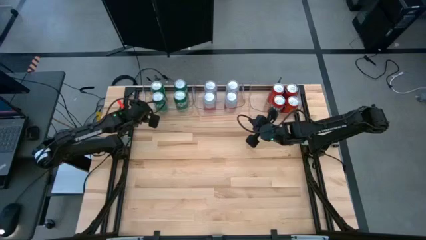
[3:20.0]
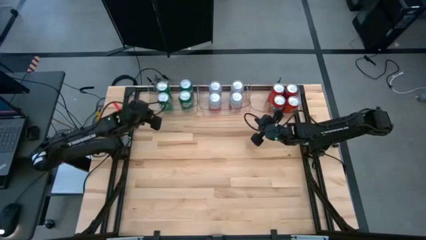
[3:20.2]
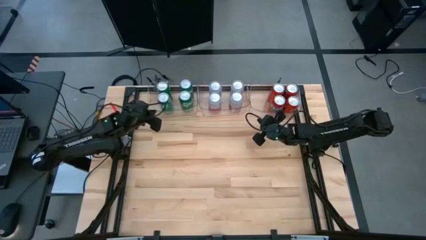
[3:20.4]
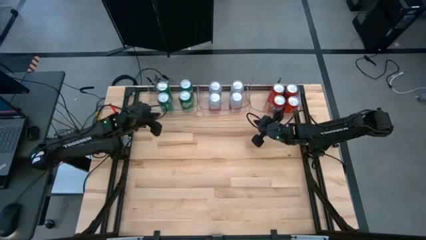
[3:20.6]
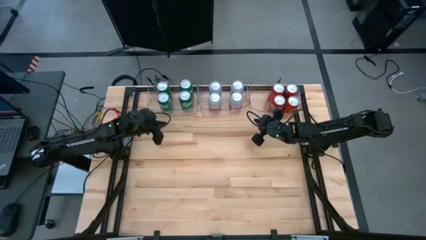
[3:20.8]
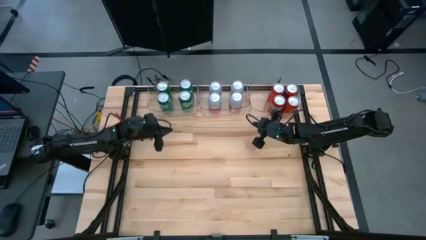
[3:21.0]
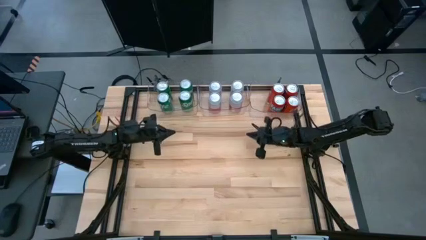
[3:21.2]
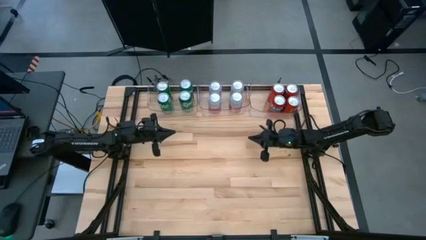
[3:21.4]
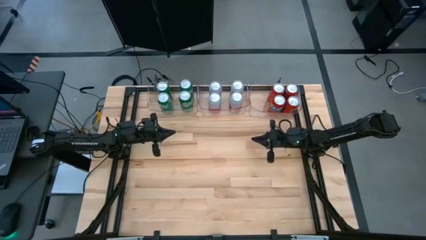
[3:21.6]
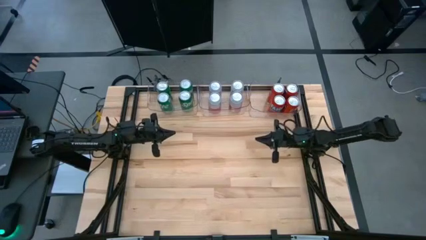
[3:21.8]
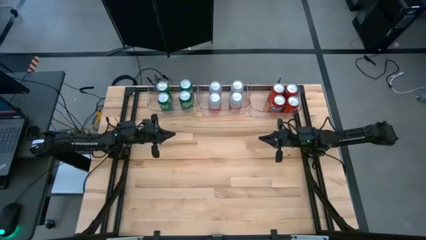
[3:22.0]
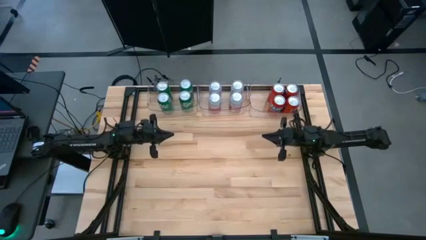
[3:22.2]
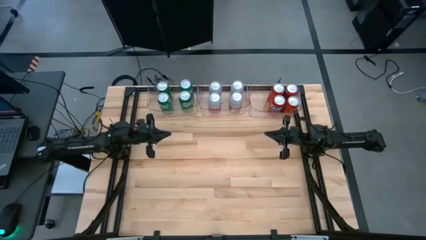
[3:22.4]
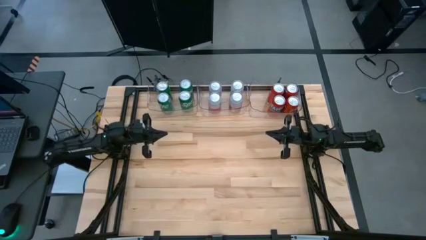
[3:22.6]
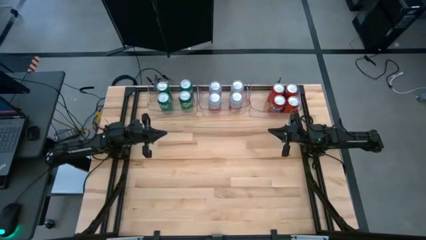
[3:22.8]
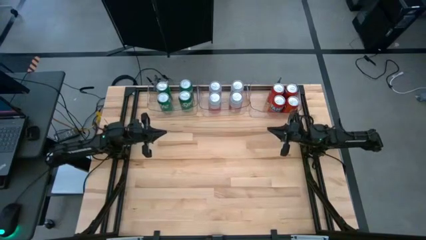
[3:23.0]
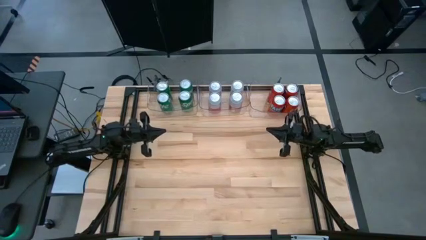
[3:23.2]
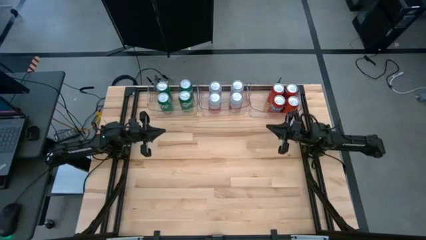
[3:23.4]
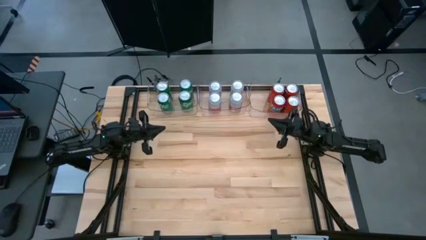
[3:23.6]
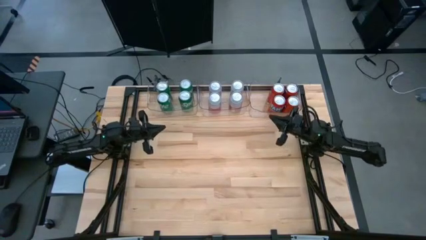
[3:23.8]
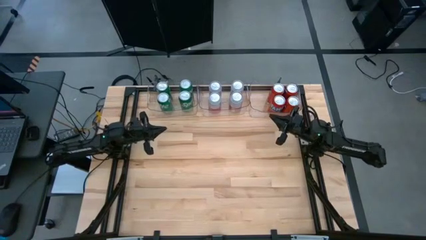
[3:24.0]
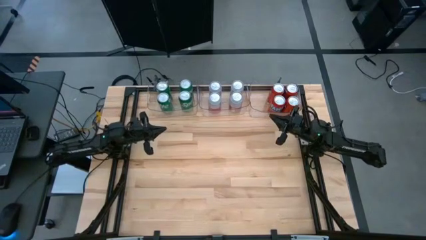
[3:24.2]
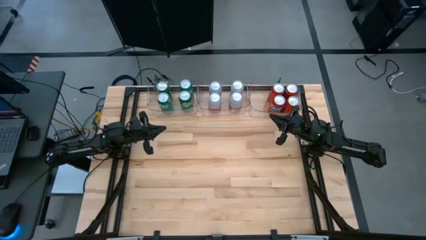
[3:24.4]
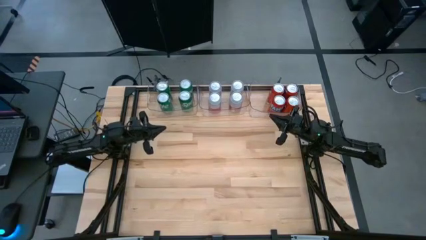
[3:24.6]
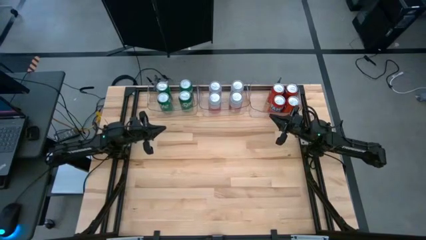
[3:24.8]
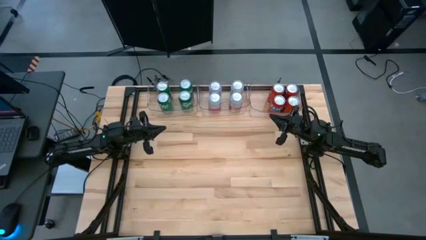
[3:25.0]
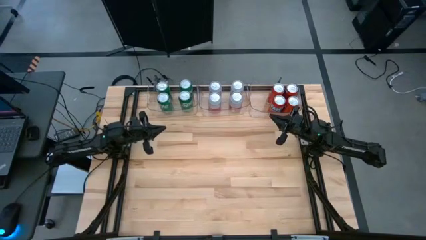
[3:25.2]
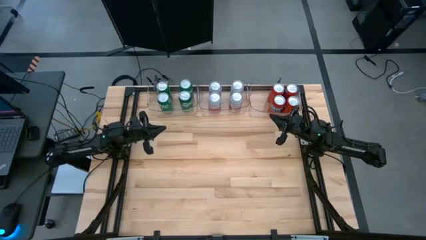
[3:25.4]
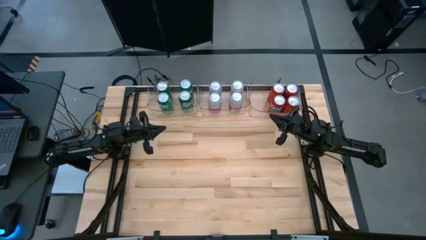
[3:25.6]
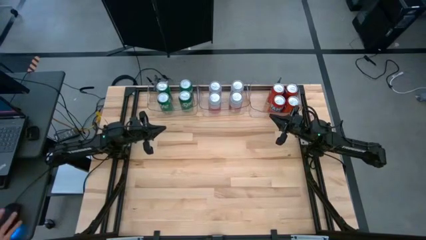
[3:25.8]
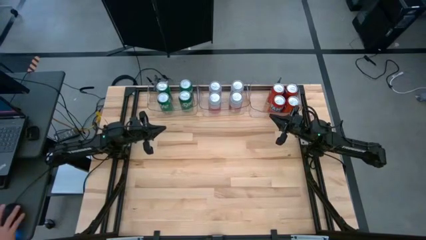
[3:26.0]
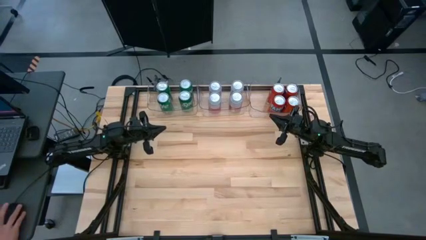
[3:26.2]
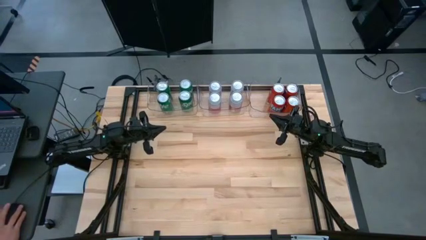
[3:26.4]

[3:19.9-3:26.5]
Task: Sort soda cans
Return to Home Position

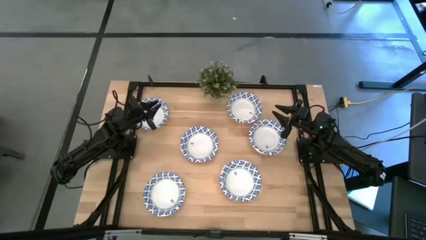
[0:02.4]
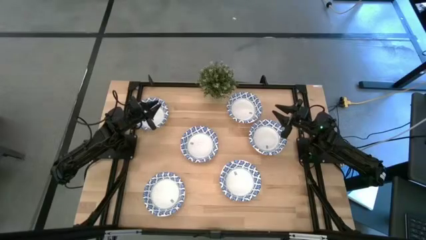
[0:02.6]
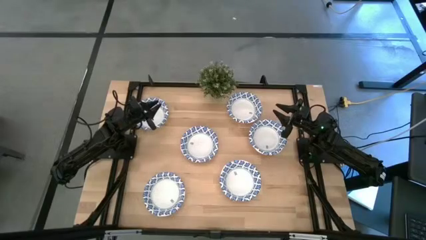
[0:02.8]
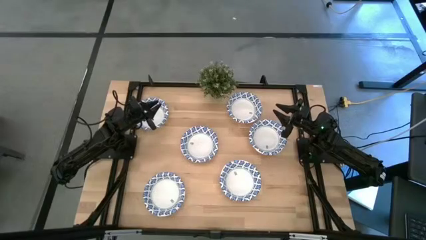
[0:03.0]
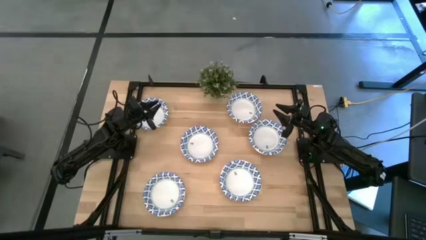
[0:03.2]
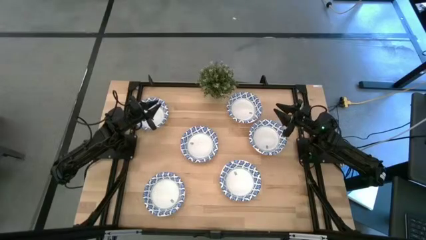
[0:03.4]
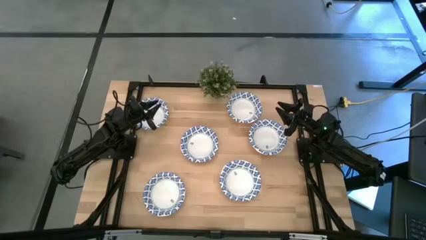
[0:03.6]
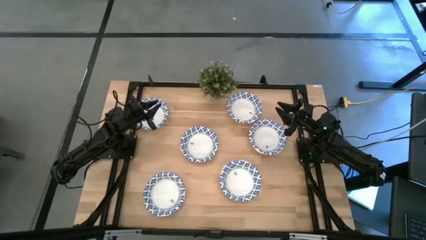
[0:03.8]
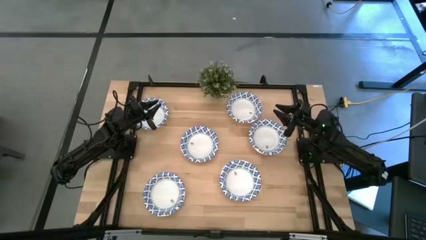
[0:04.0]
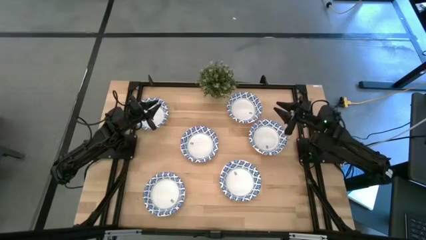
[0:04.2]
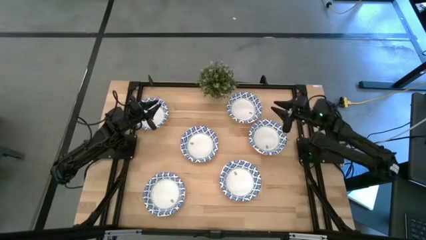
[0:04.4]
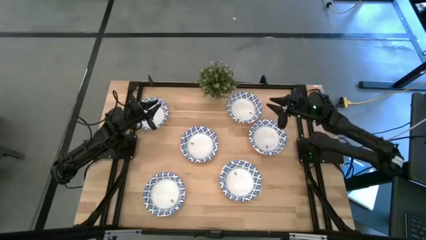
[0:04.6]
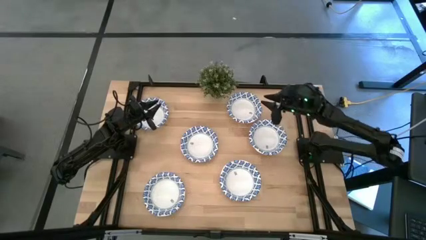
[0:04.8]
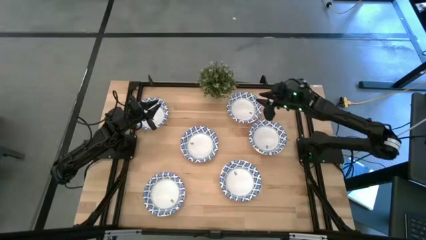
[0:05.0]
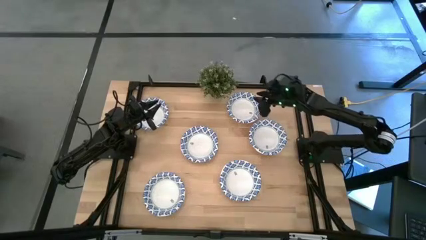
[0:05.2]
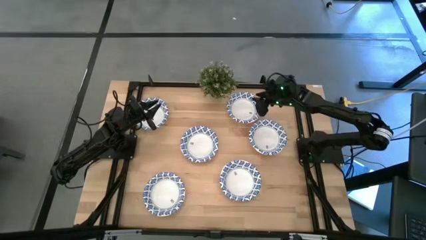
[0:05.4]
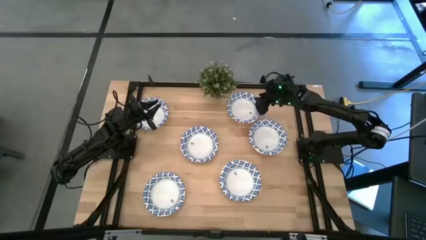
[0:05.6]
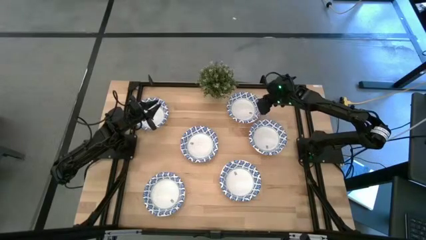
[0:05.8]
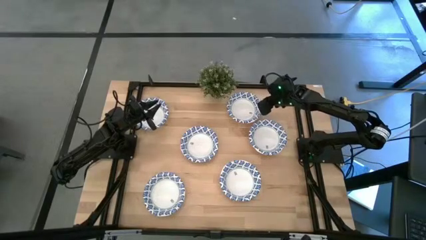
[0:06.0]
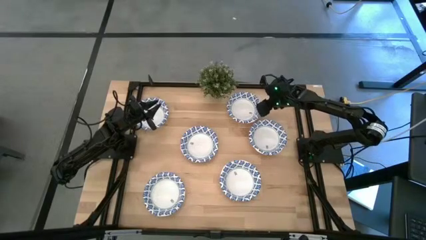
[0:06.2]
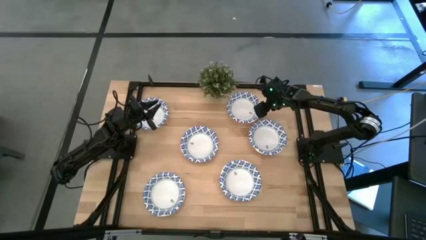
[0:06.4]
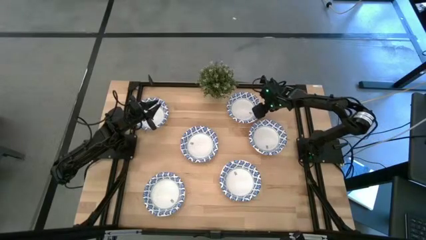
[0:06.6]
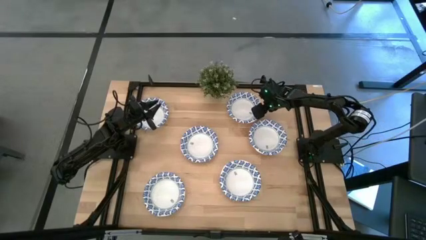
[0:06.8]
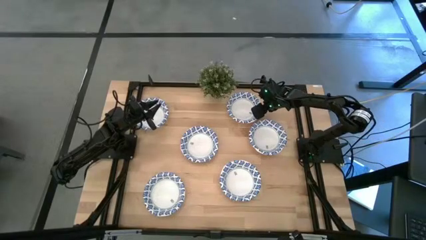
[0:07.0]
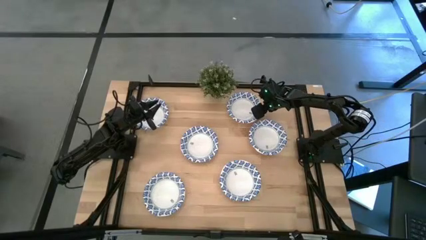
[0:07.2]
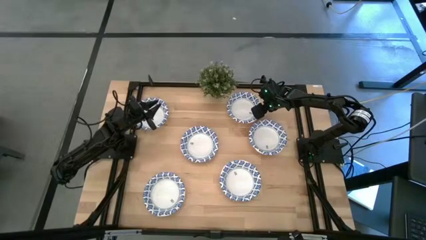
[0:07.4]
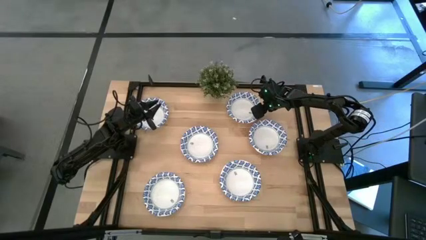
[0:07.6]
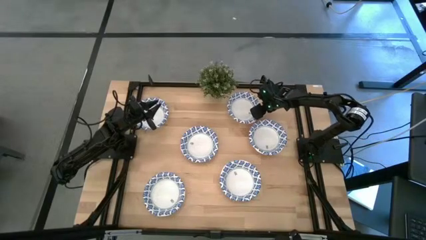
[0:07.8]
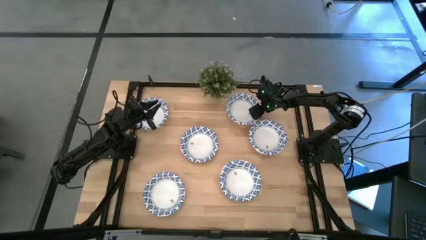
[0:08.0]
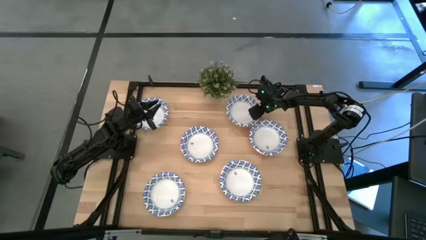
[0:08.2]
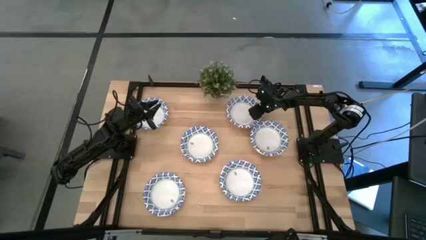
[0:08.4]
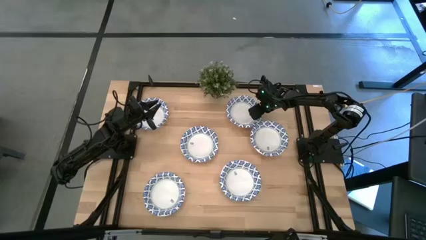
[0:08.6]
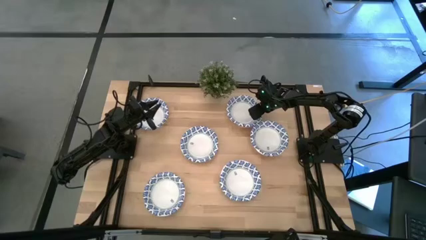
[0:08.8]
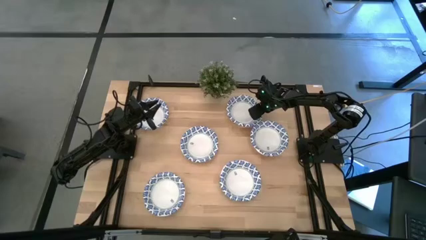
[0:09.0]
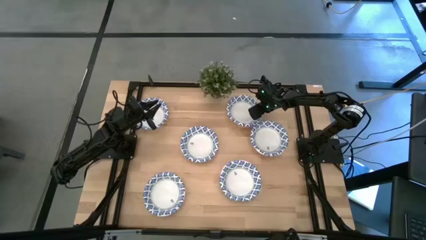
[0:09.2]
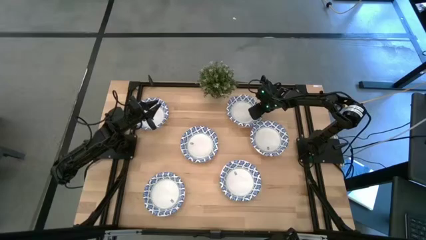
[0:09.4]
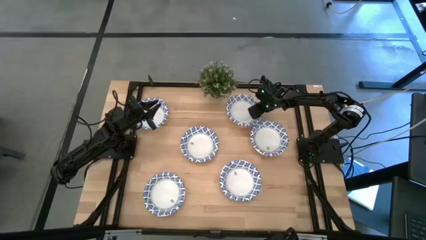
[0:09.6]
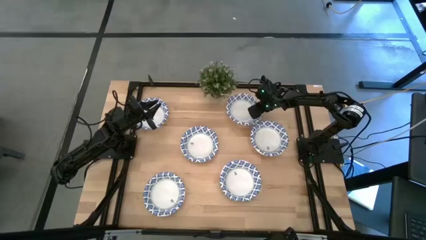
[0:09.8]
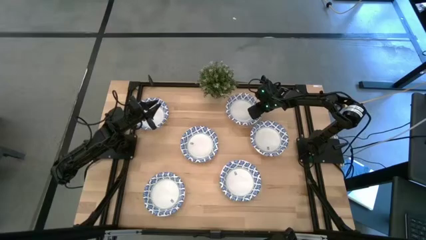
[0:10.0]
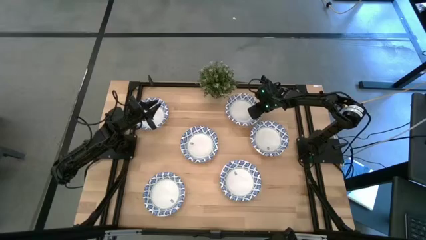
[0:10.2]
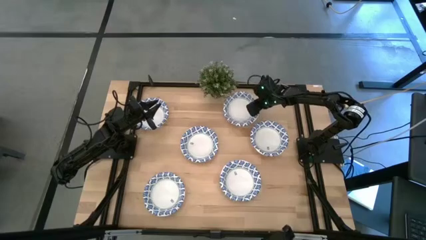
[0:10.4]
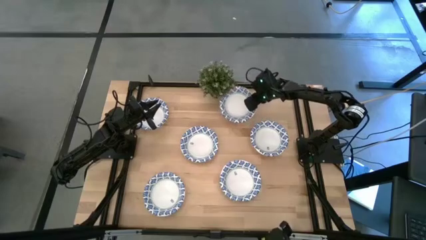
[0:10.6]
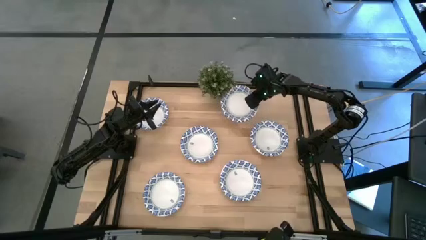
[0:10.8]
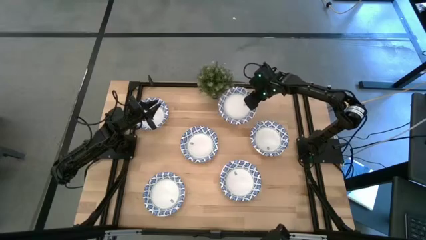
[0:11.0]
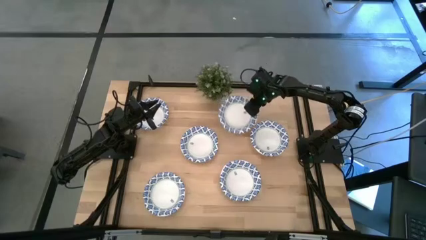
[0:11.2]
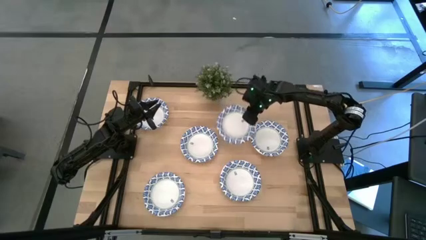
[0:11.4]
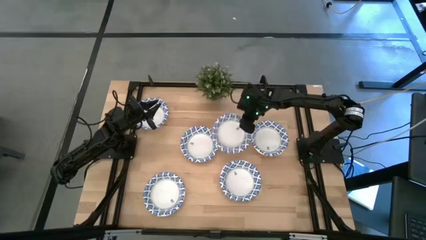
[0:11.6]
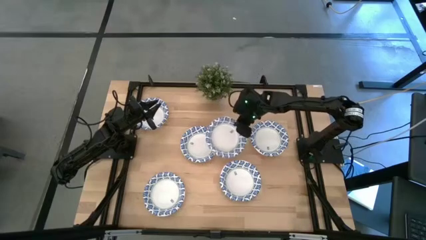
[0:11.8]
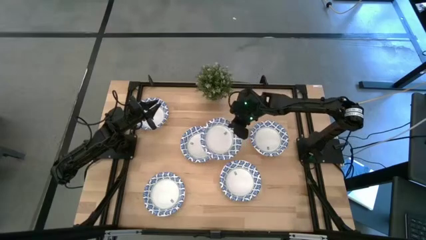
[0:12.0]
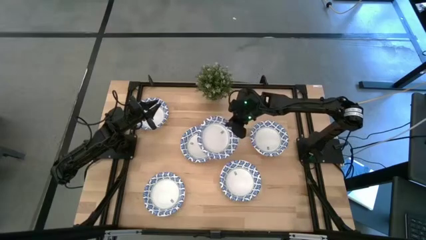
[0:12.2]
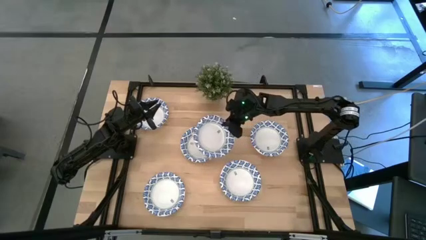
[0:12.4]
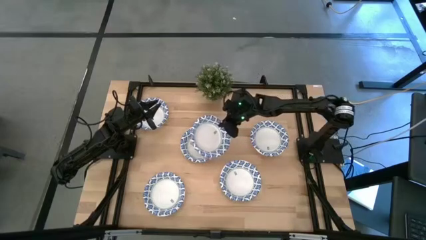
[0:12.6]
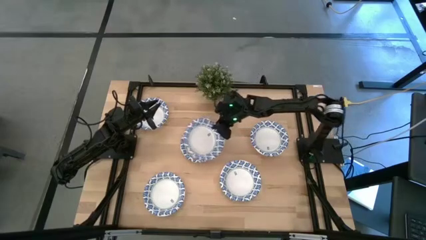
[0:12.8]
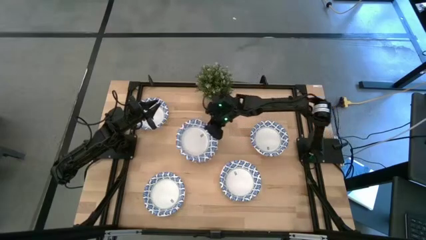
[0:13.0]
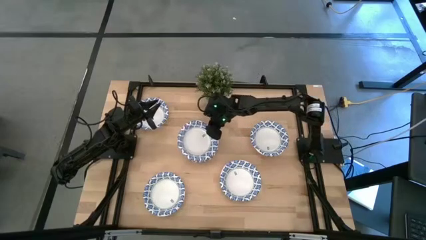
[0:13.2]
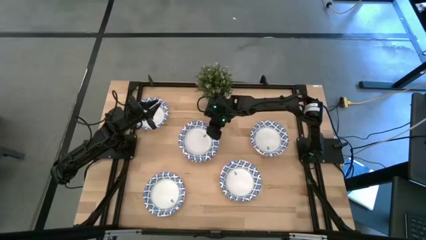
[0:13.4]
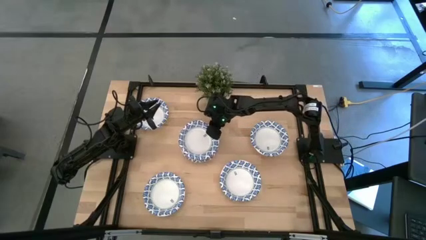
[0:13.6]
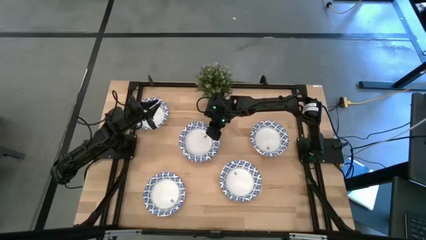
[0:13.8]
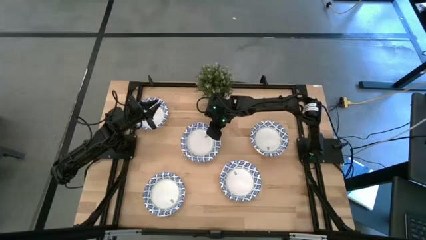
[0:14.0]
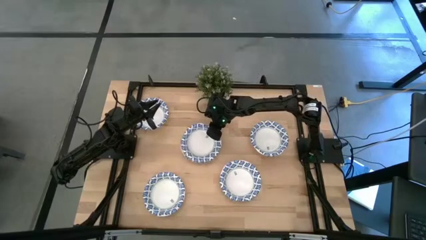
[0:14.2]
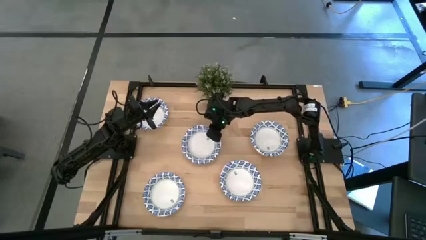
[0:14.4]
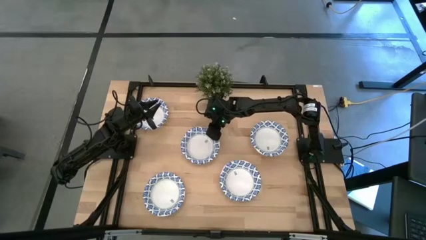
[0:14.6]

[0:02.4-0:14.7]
Task: Nest bowls inside each other
Stack the white bowl on the white bowl
